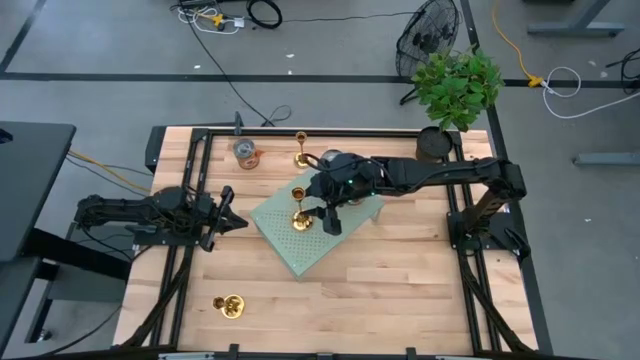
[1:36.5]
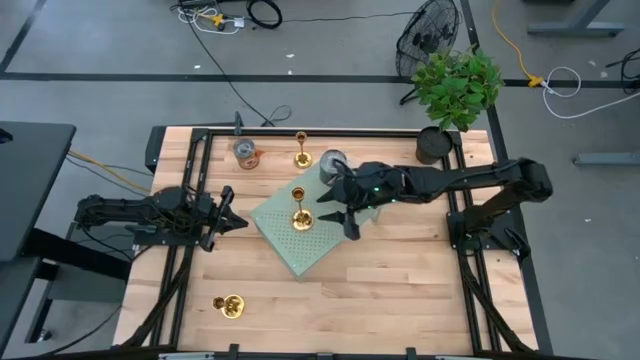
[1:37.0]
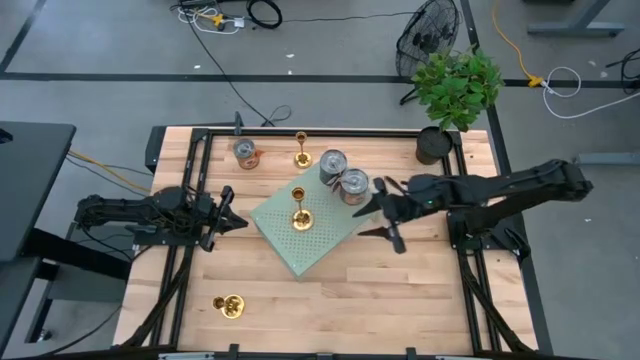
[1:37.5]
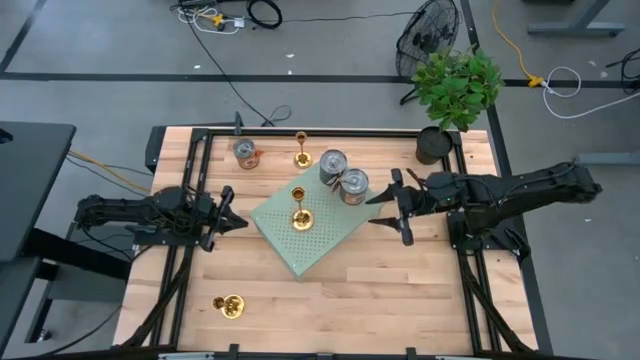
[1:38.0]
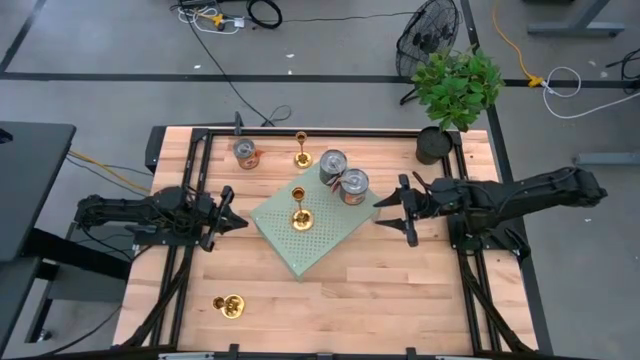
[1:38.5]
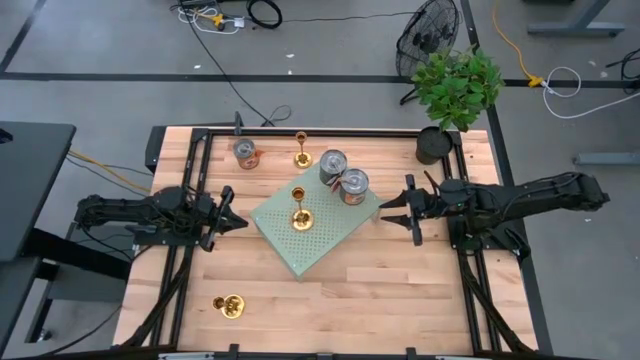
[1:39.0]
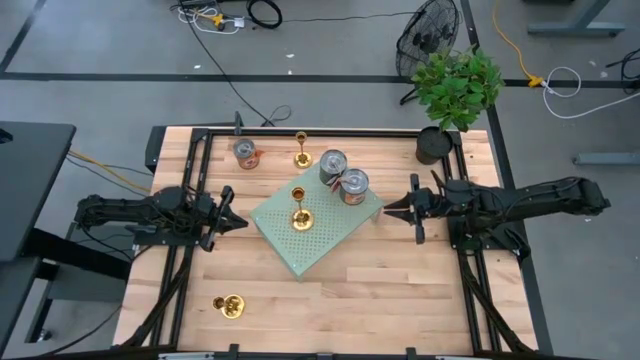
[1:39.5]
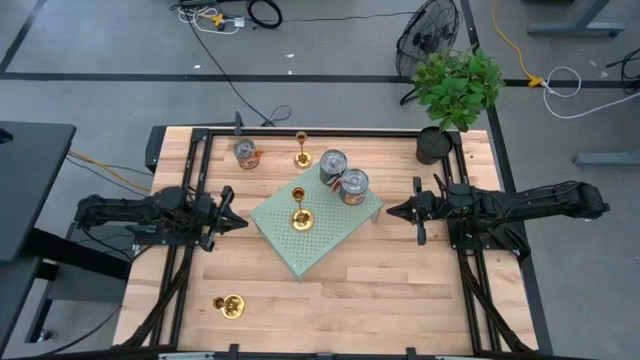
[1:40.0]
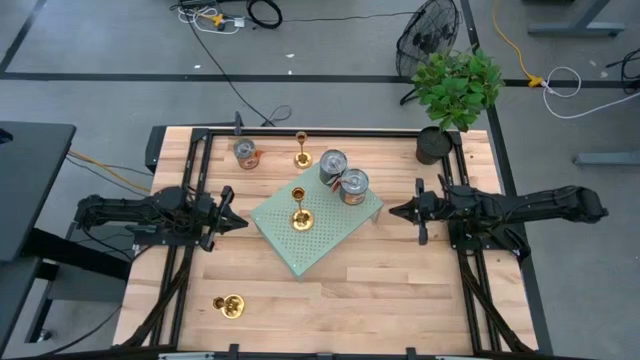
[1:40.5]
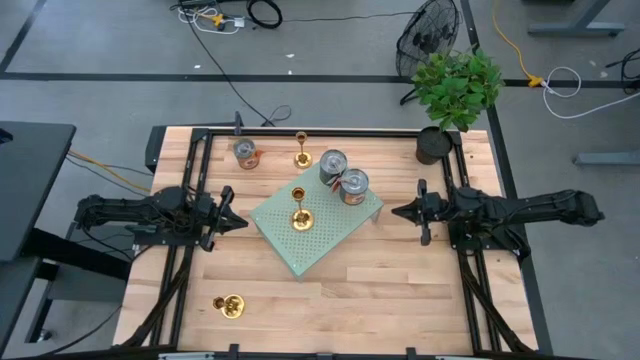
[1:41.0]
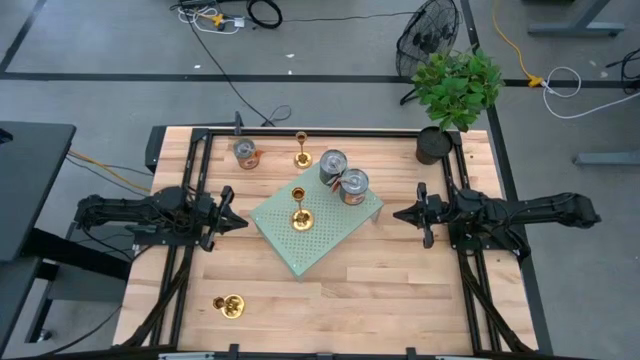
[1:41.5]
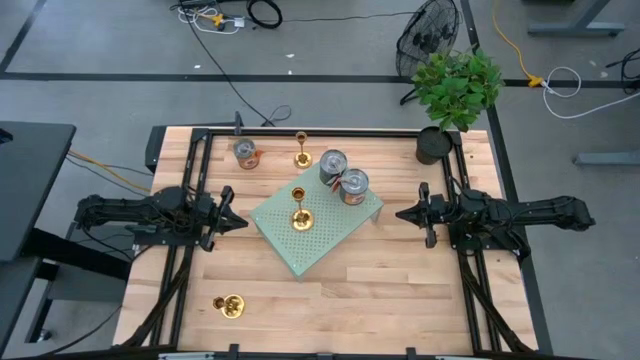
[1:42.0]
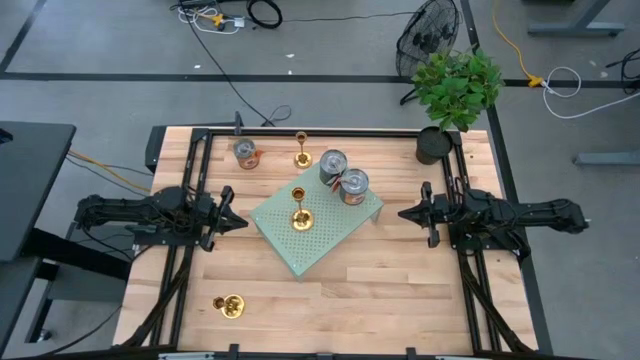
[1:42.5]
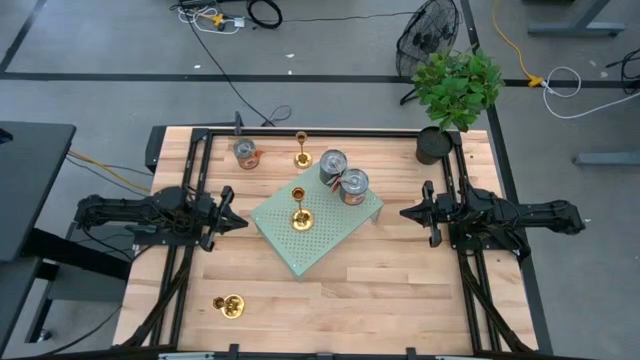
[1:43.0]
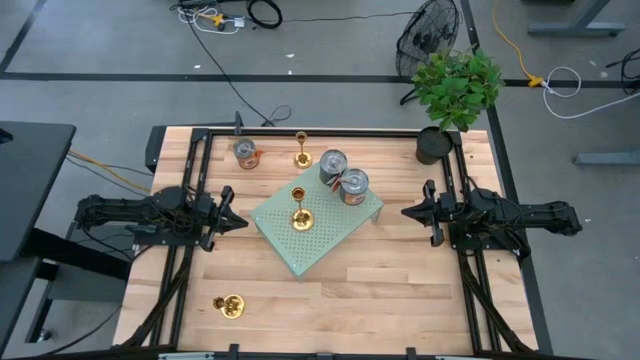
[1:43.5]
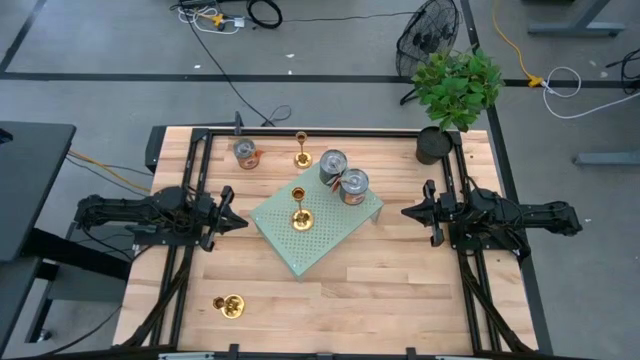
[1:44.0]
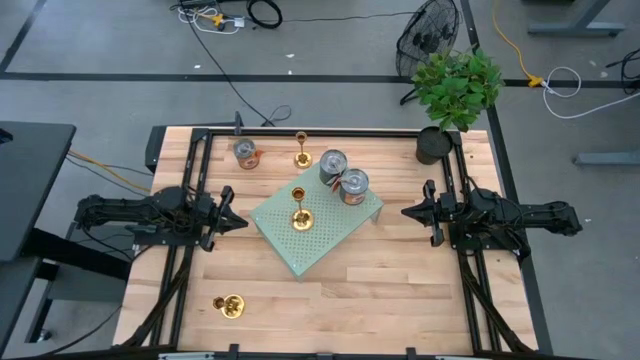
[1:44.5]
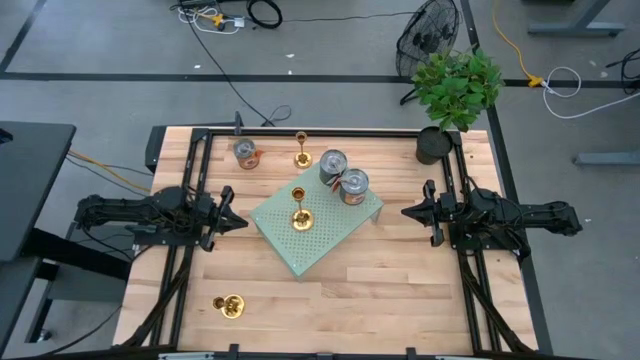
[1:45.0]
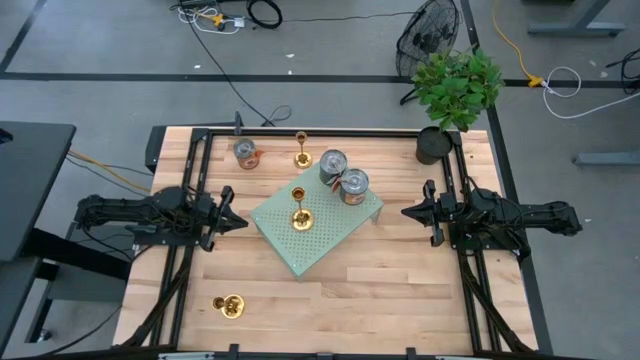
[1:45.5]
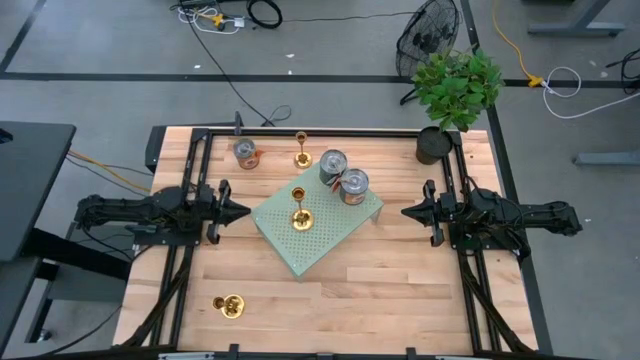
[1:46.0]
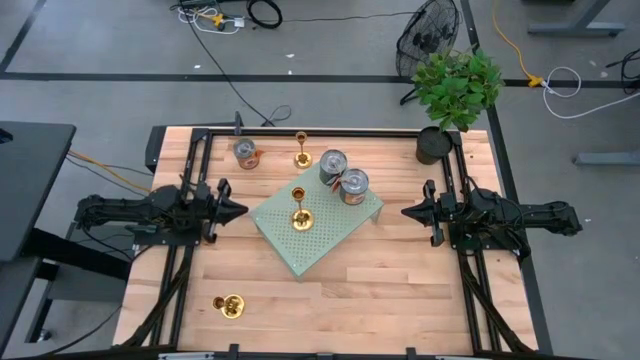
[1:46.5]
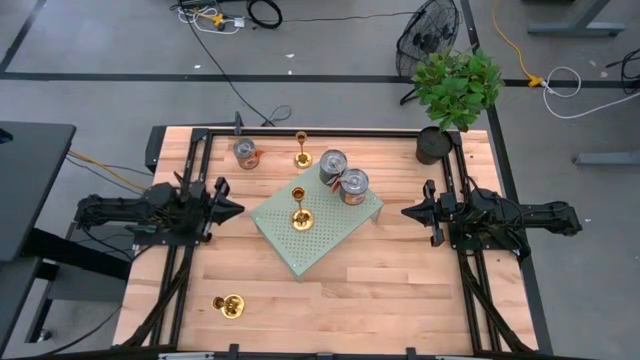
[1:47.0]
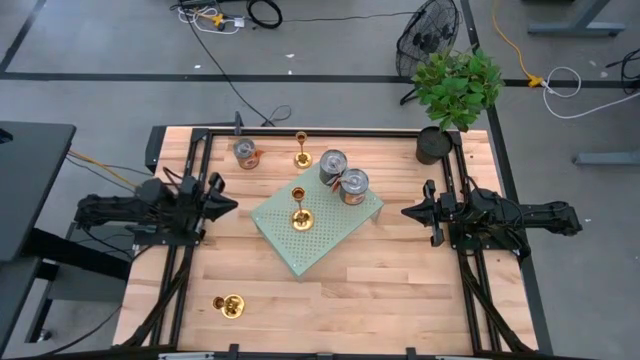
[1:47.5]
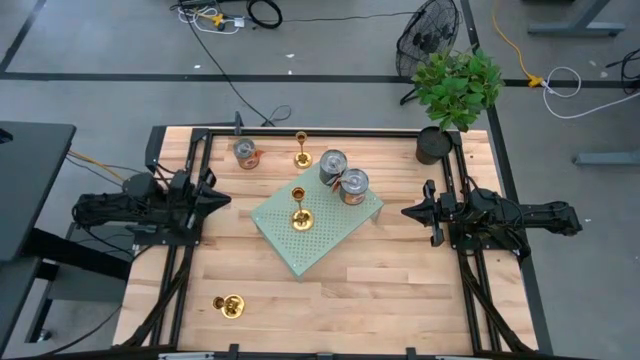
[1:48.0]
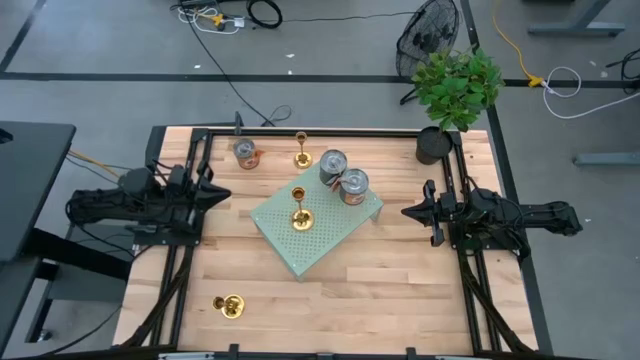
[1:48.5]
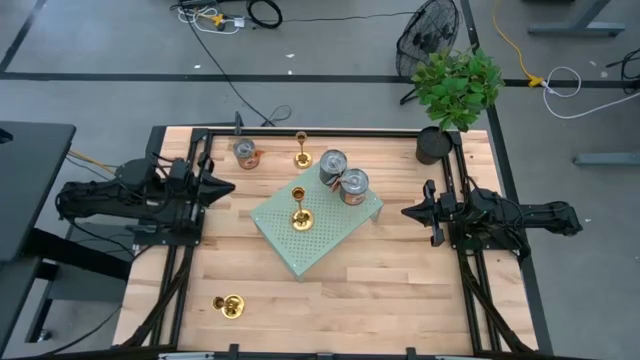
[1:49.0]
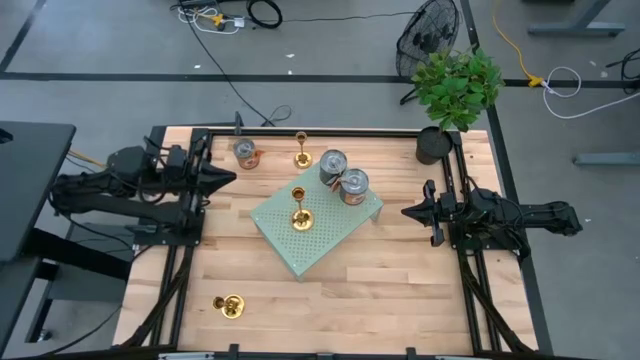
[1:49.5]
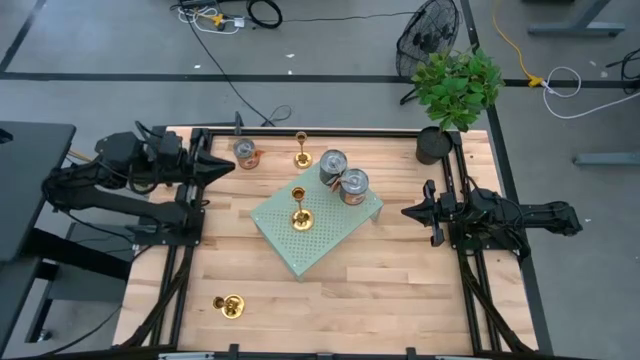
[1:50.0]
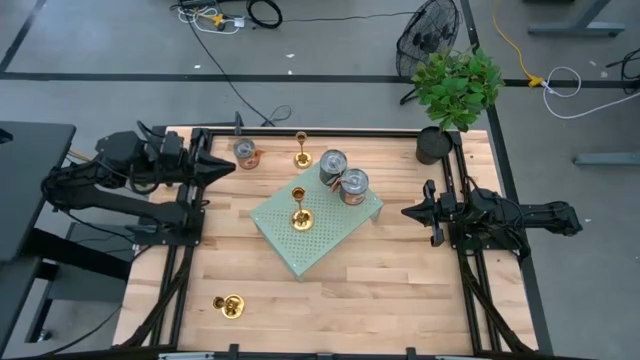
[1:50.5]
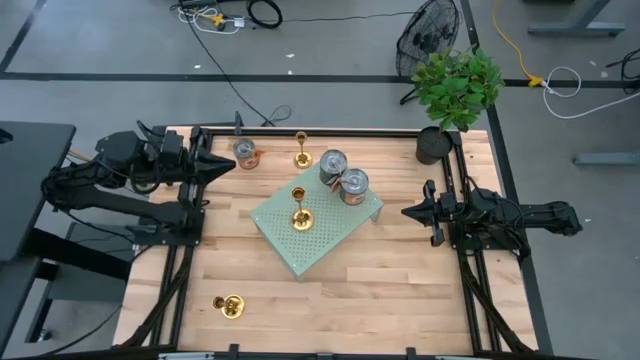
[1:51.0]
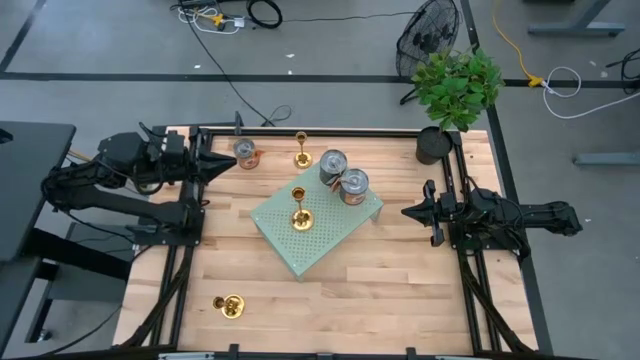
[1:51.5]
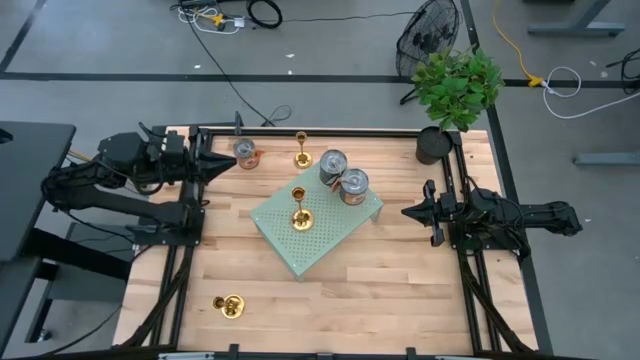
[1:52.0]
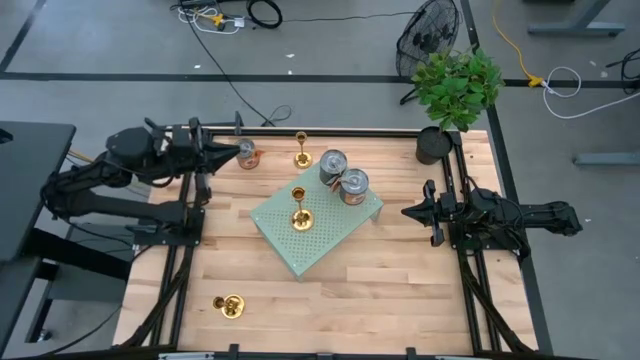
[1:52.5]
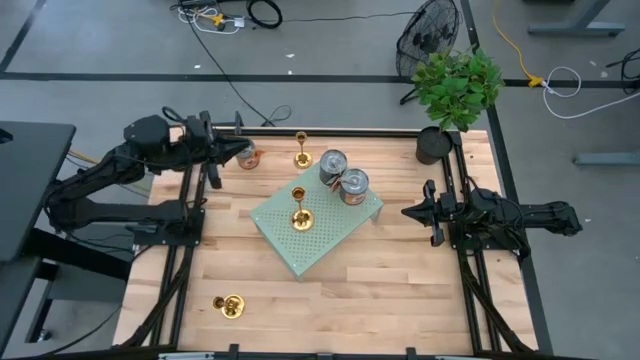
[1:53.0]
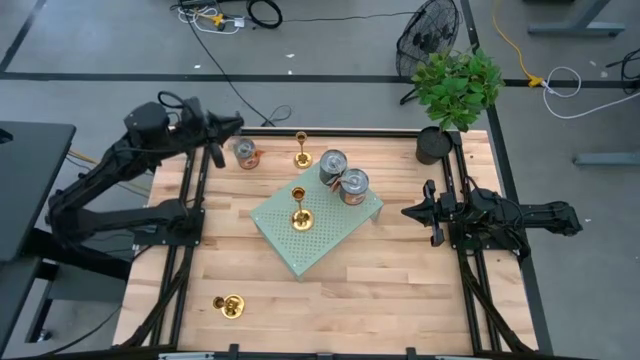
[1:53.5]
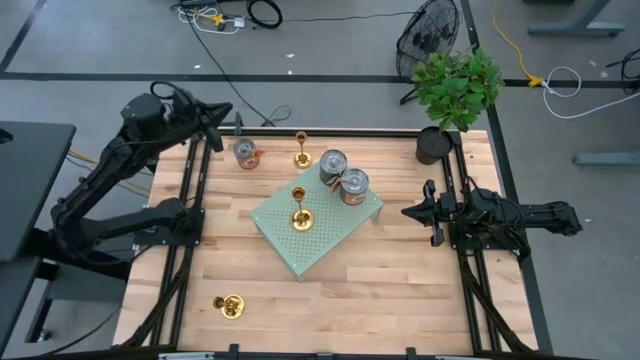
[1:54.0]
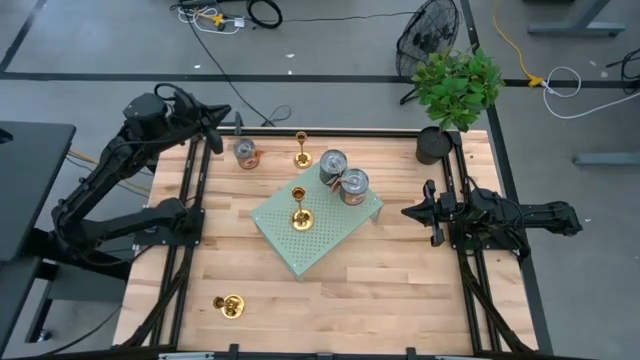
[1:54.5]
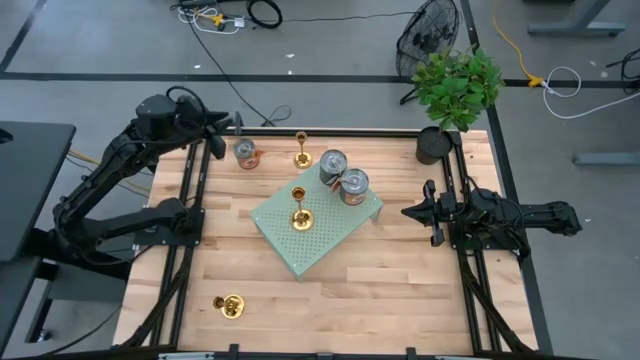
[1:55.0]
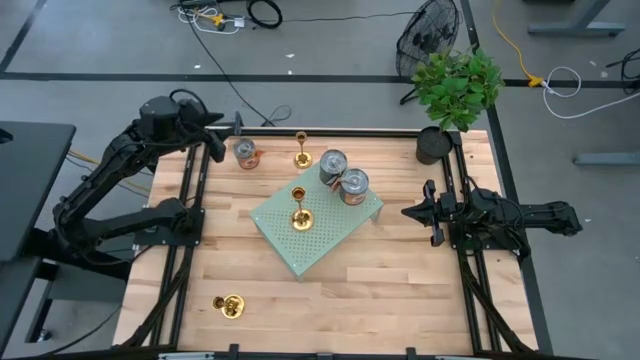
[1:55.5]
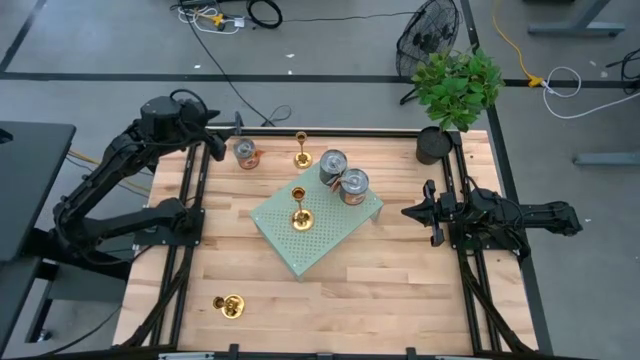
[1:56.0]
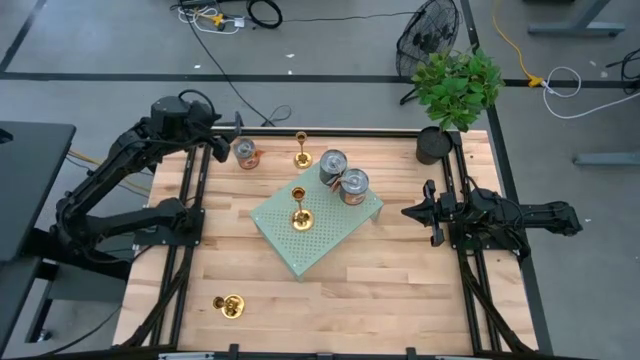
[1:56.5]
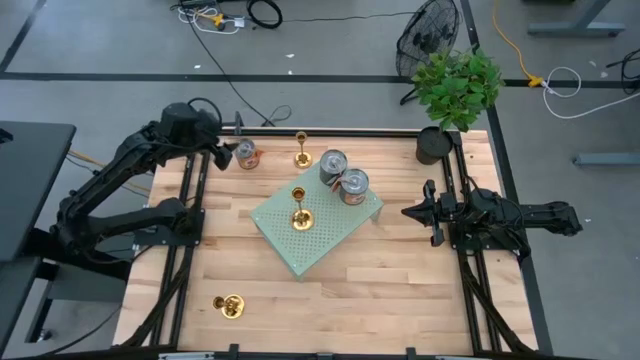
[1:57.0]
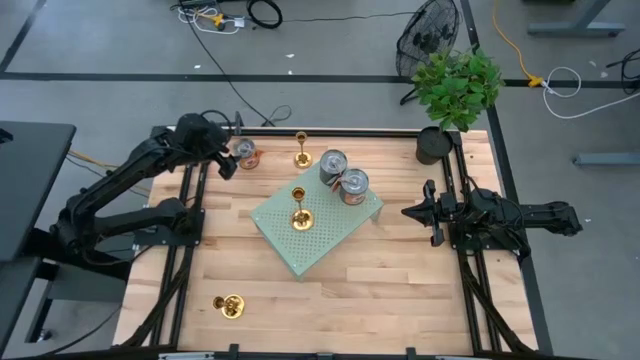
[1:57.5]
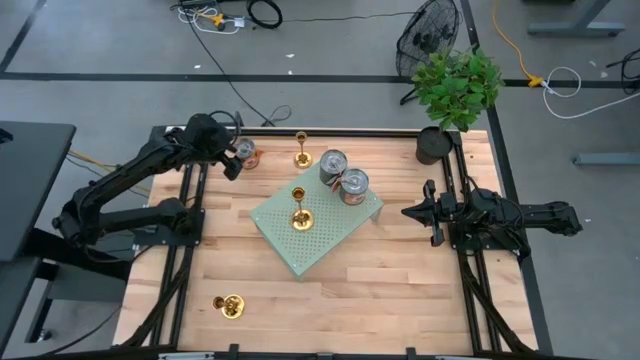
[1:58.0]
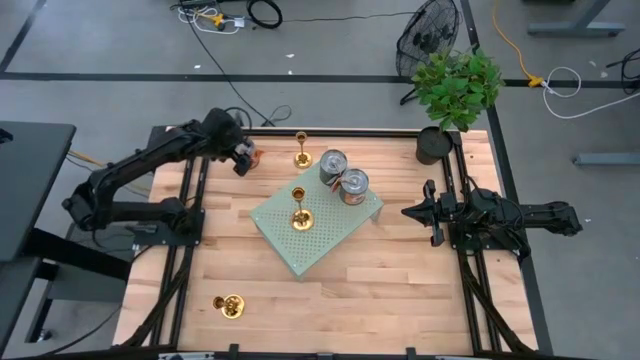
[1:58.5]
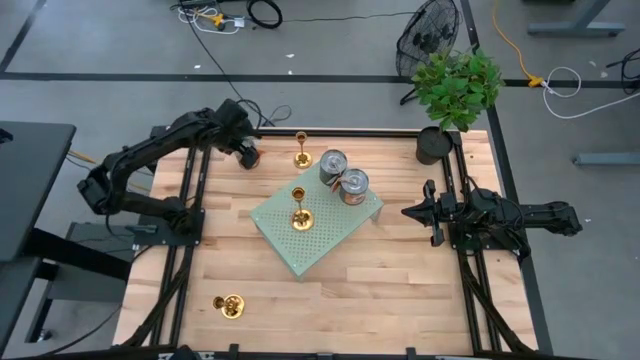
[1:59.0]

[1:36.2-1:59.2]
Task: Pick & Place candle stick holders
Put the silver scented candle on the shelf
